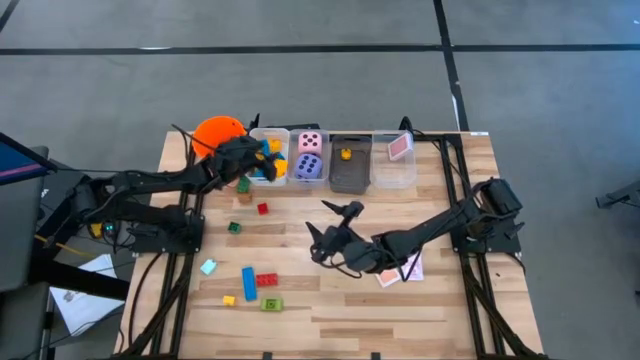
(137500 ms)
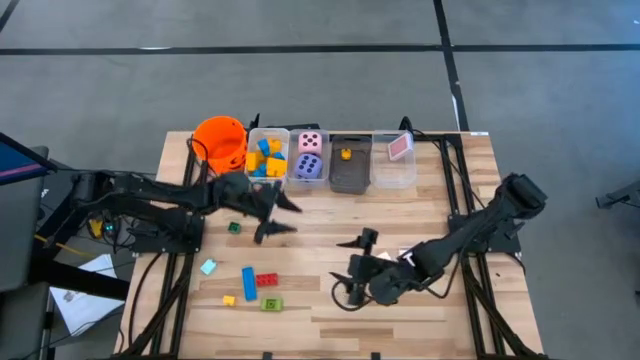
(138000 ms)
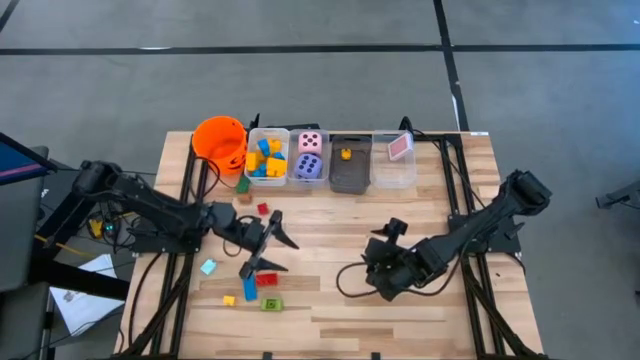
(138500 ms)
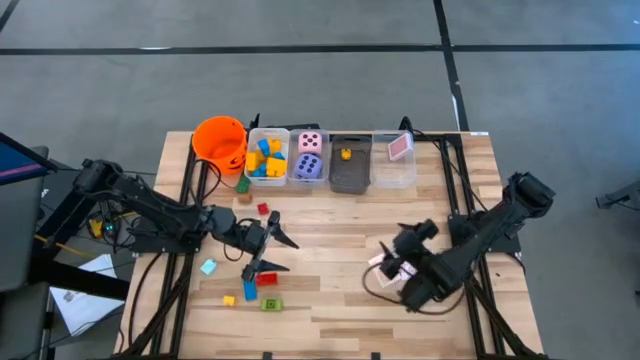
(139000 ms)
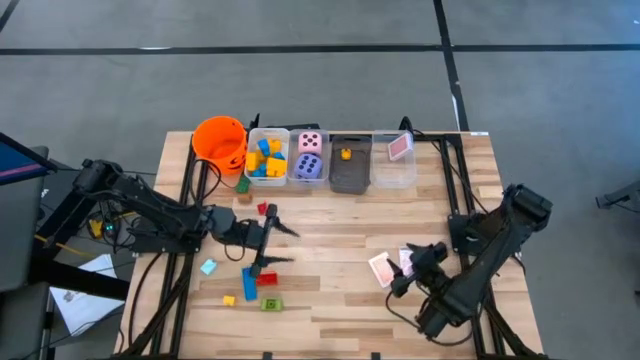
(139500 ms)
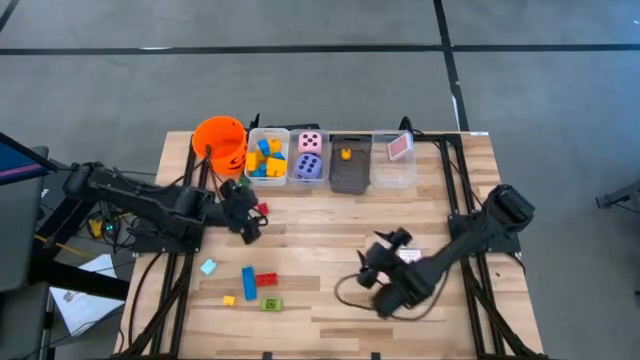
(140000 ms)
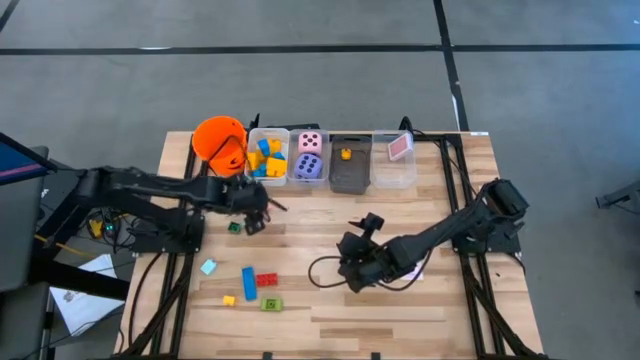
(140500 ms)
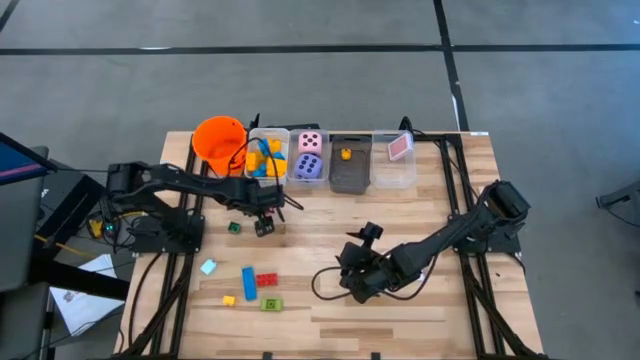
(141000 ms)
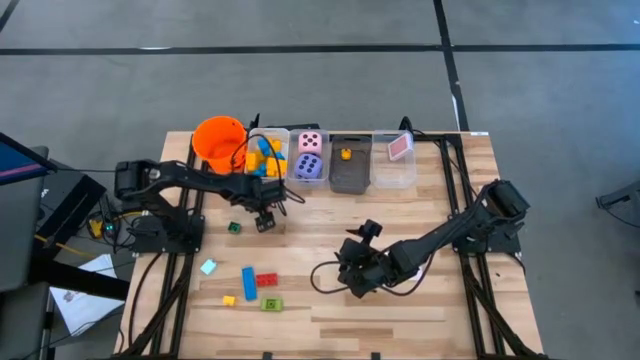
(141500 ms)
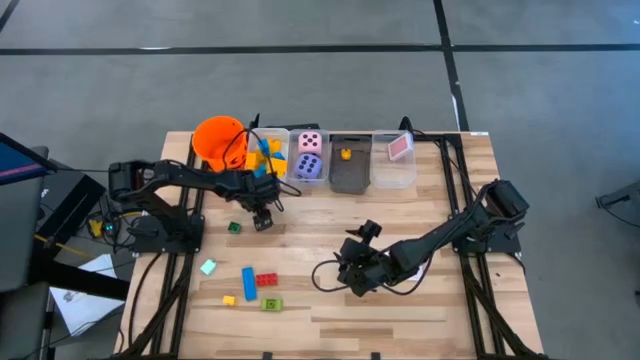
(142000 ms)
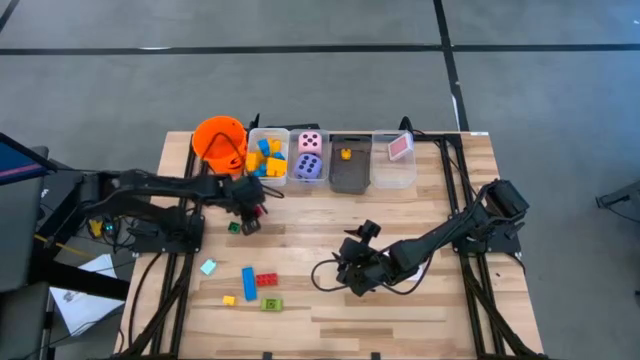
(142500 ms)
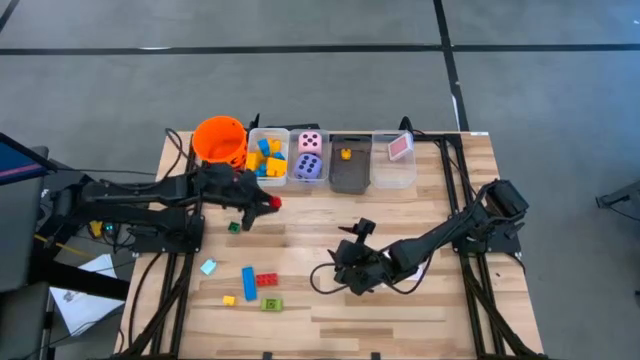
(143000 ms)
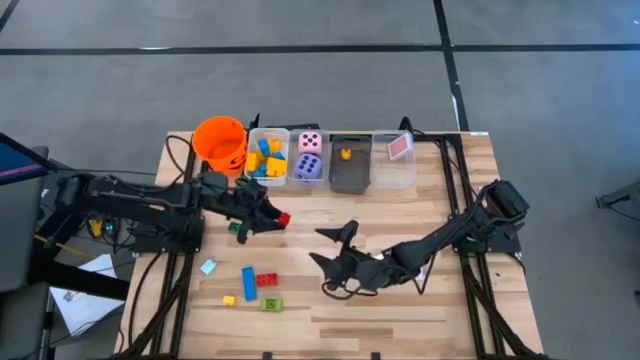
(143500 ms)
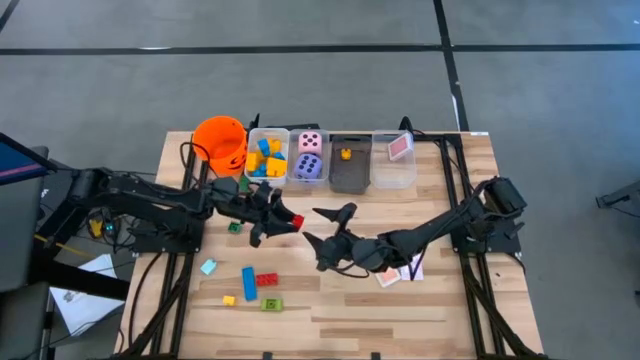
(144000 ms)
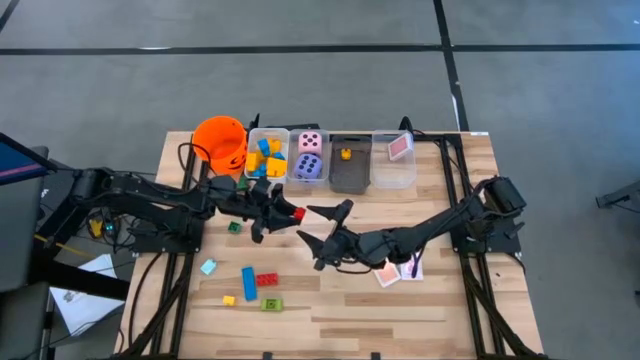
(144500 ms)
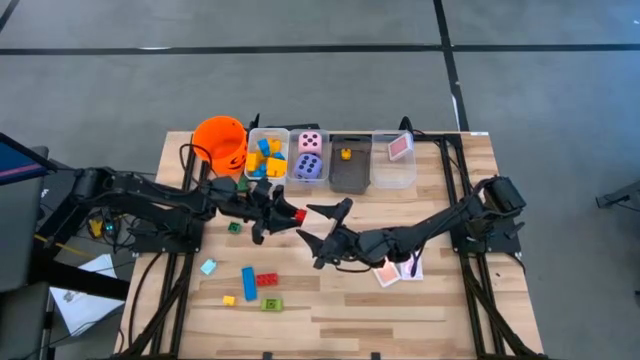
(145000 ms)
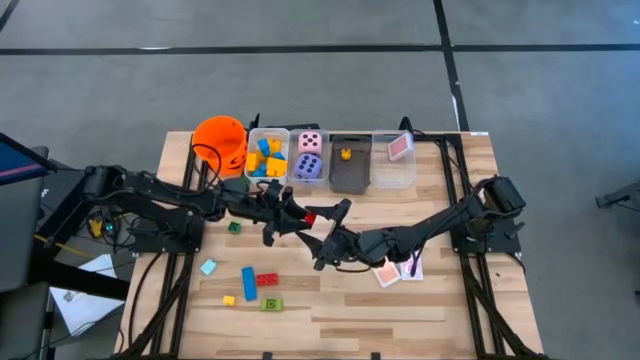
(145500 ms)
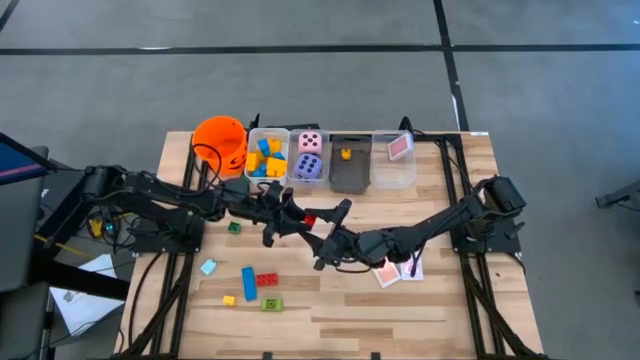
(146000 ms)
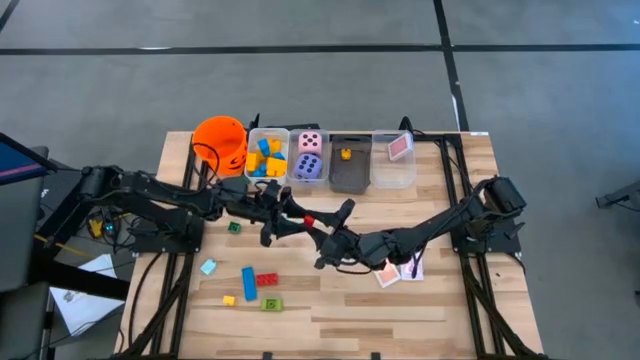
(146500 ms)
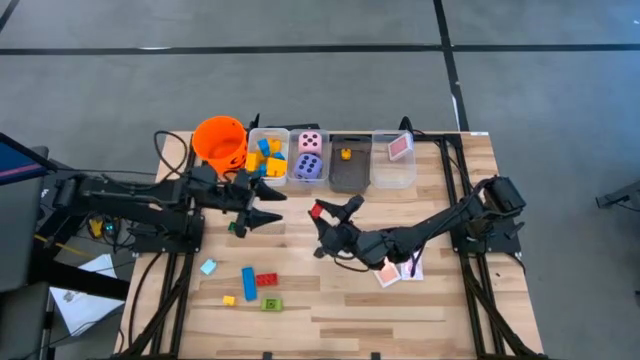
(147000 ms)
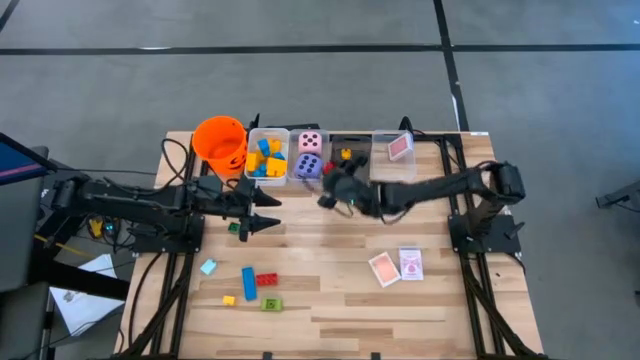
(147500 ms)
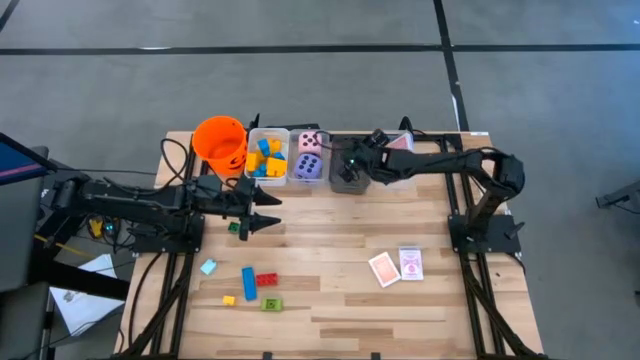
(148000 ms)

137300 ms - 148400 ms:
Task: Pick & Place Toys
Put the red game piece into the black bin

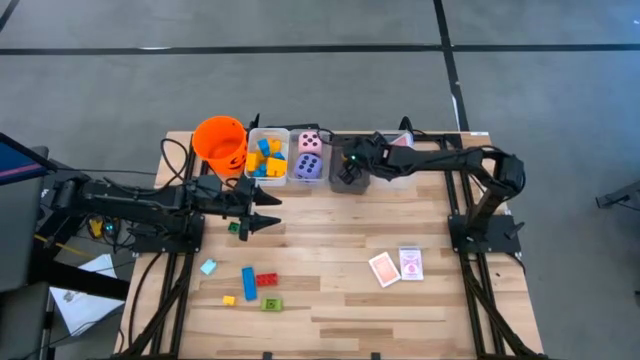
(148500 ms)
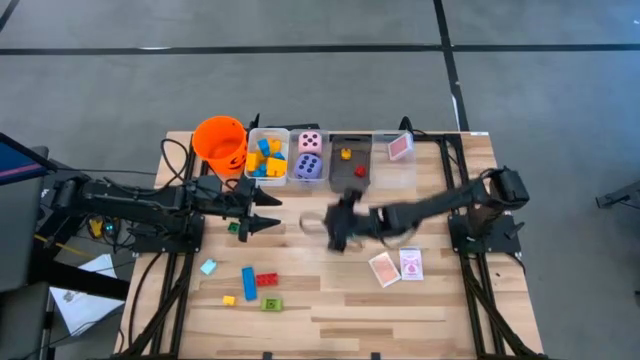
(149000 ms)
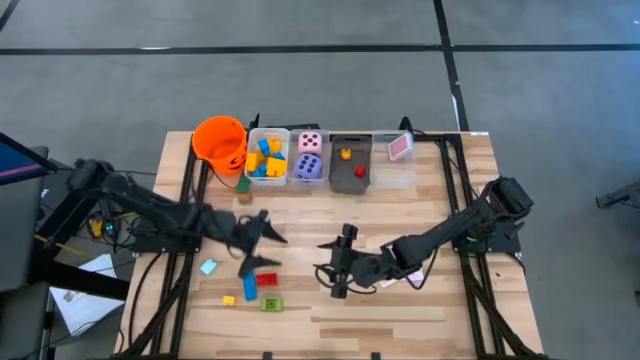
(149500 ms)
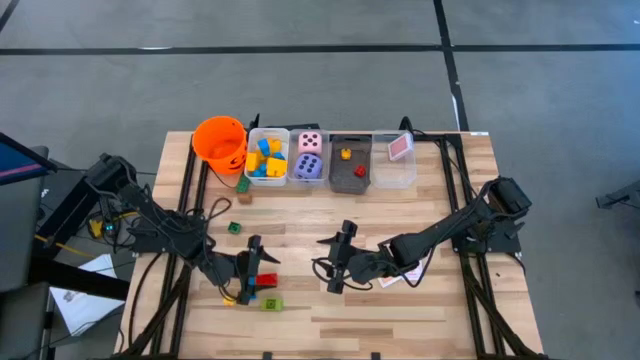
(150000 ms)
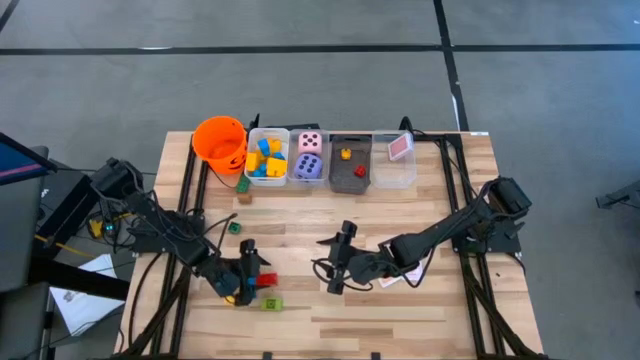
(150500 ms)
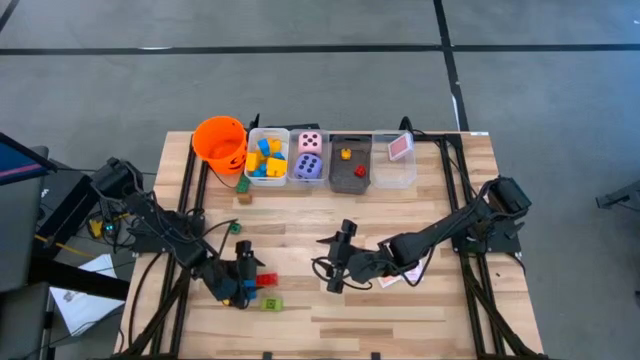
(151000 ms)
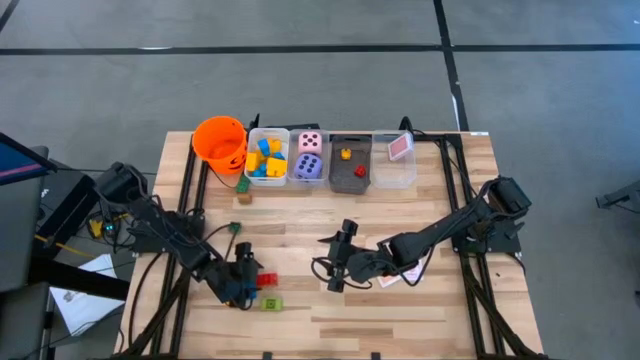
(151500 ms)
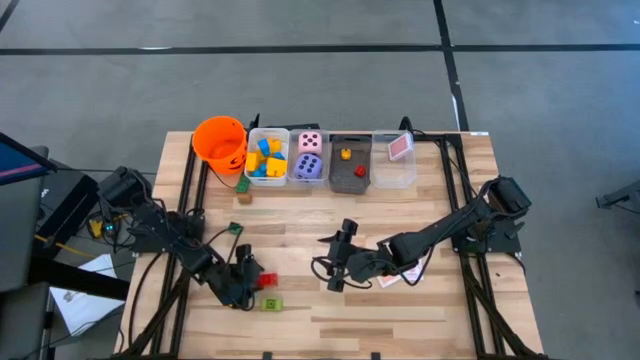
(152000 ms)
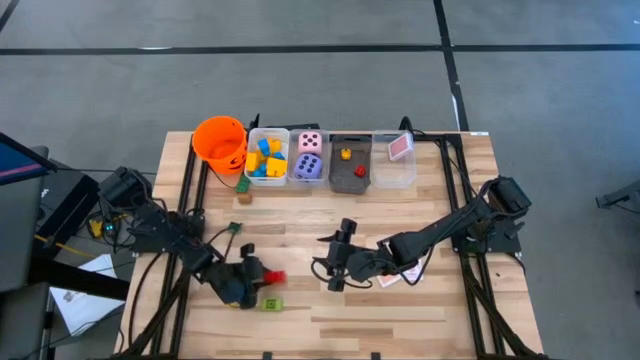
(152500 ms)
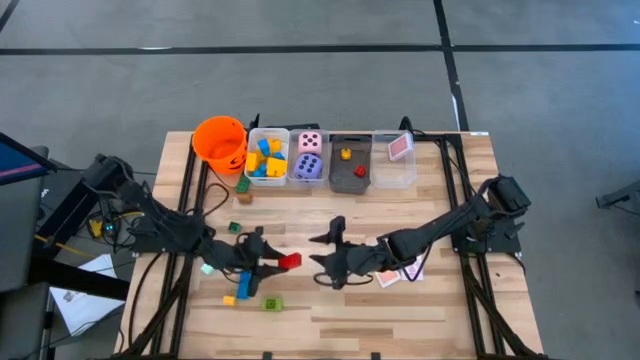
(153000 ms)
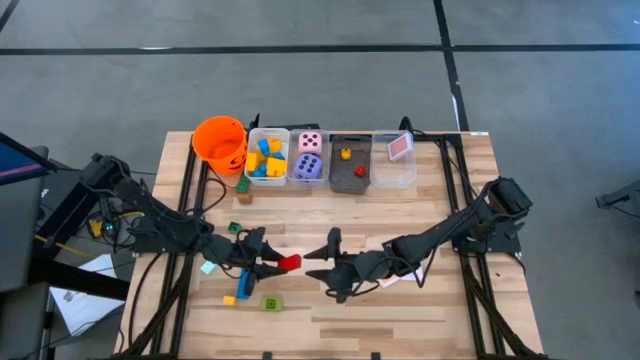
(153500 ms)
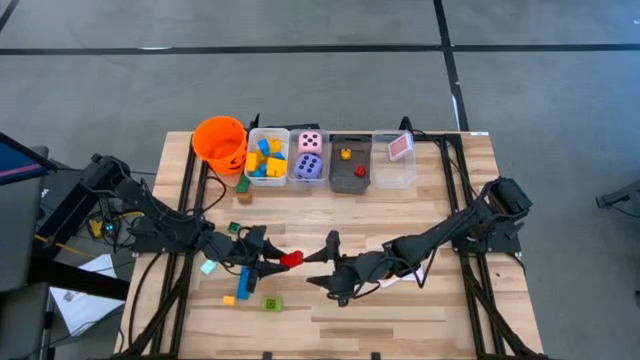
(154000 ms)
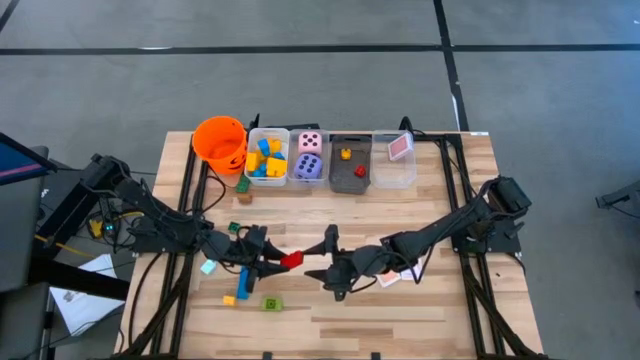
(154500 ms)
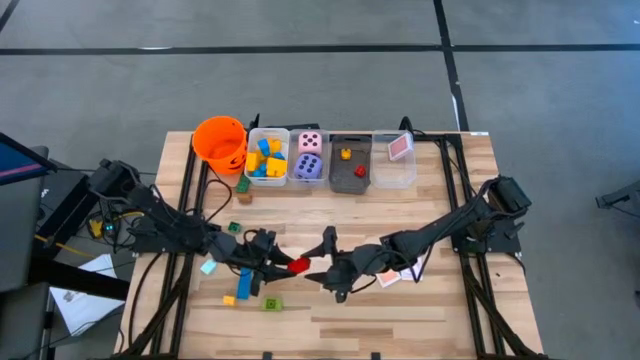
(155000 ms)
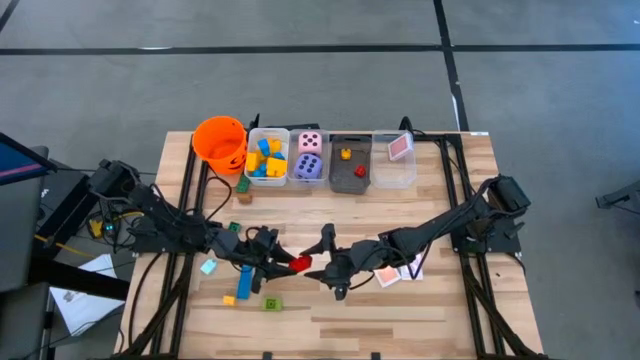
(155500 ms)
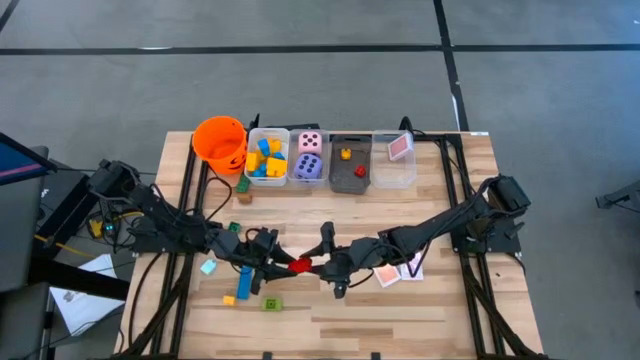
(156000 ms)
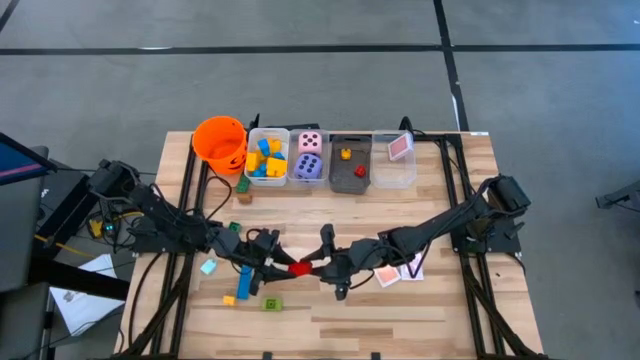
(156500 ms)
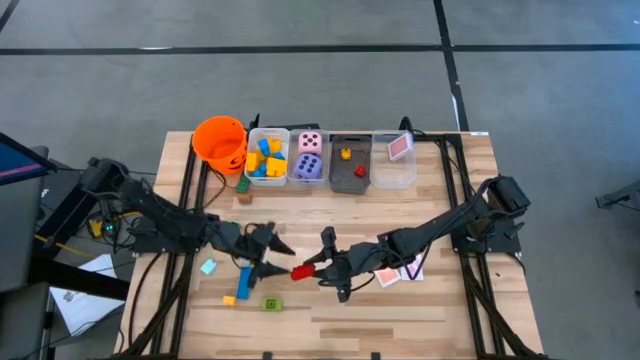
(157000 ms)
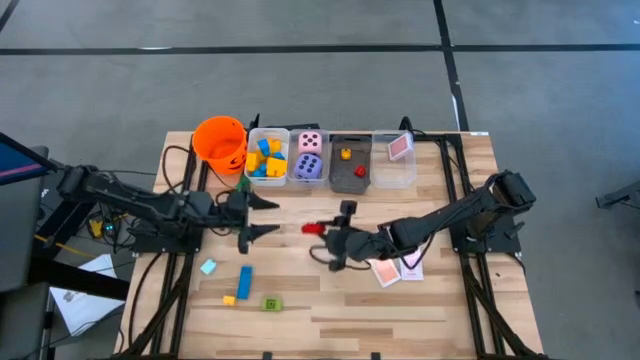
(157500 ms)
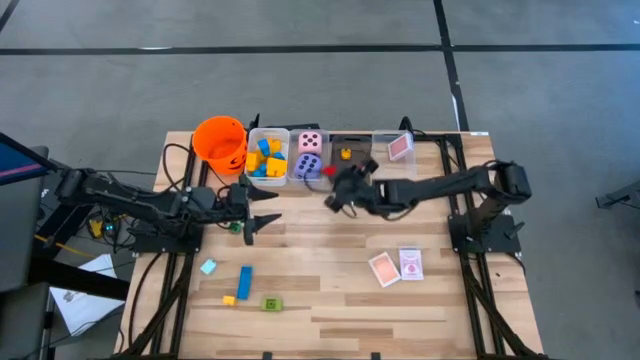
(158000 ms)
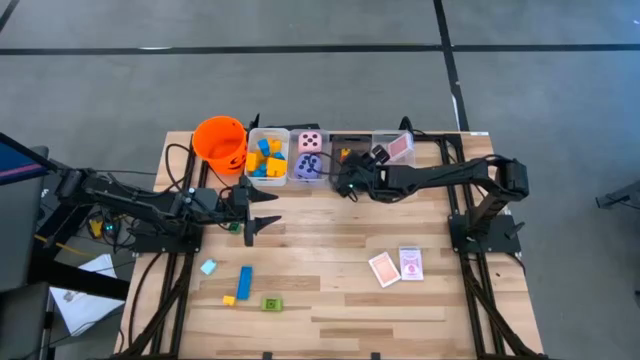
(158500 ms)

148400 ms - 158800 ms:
Put the red game piece into the black bin
